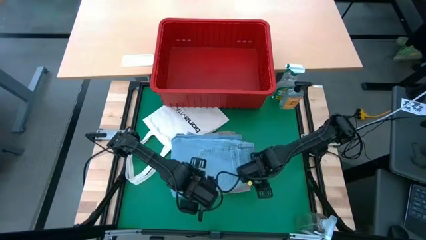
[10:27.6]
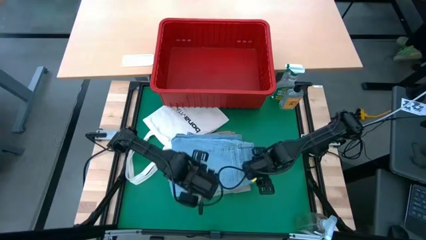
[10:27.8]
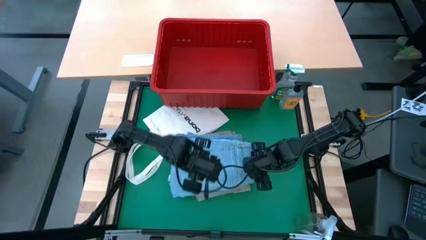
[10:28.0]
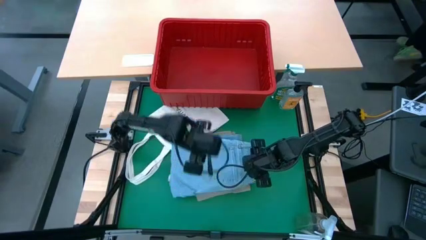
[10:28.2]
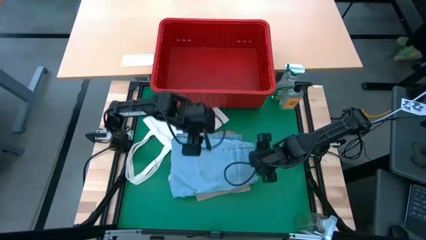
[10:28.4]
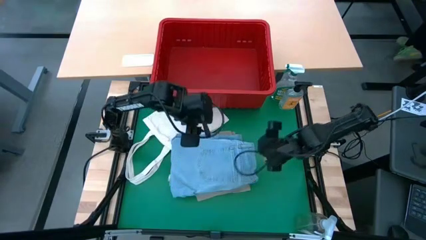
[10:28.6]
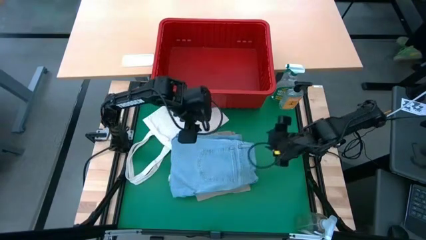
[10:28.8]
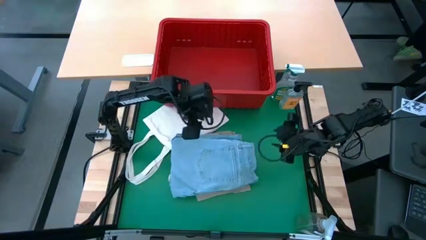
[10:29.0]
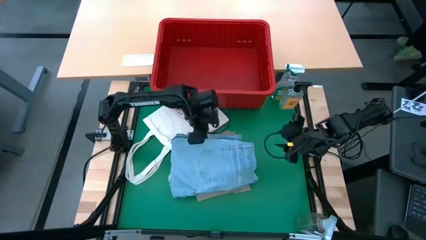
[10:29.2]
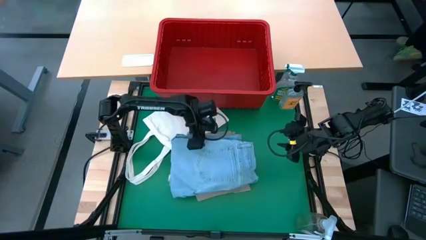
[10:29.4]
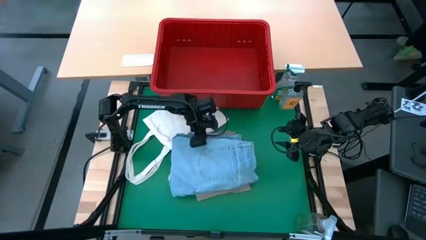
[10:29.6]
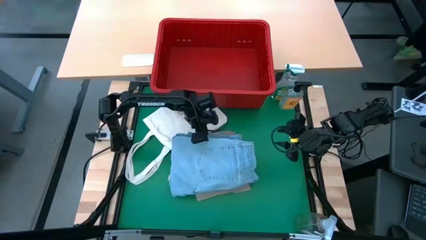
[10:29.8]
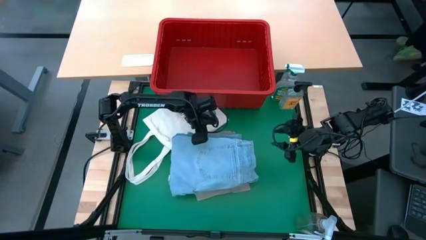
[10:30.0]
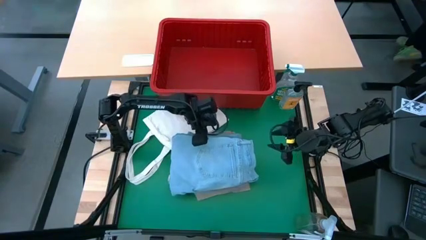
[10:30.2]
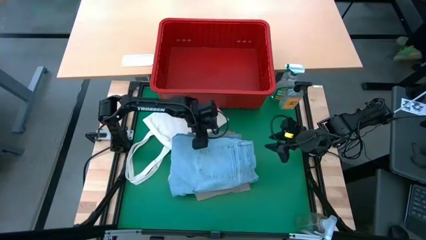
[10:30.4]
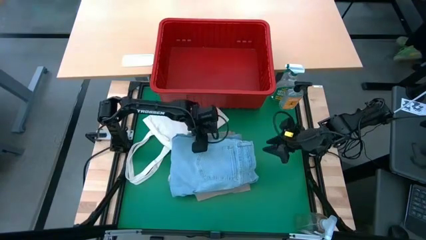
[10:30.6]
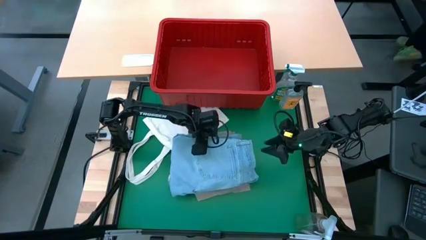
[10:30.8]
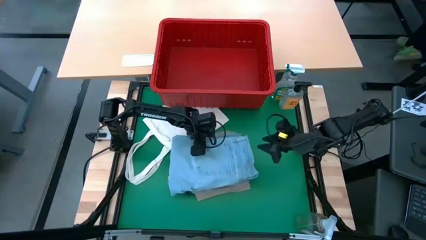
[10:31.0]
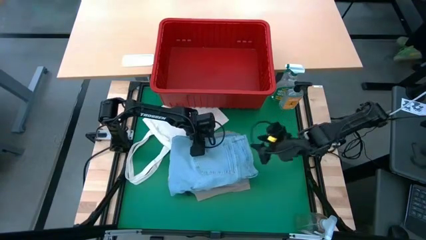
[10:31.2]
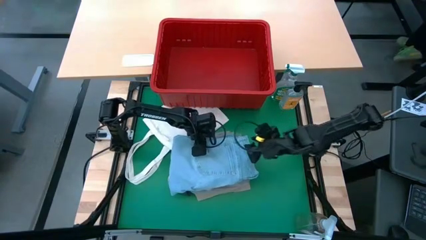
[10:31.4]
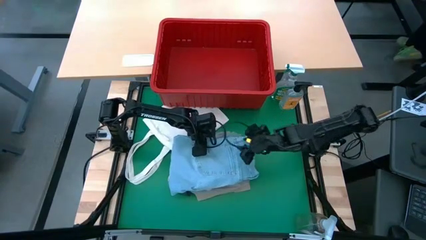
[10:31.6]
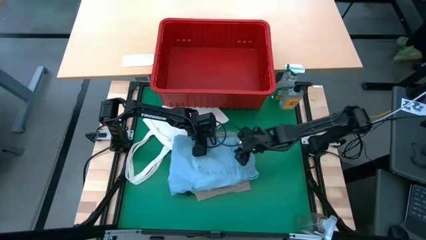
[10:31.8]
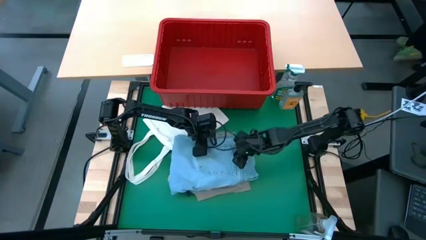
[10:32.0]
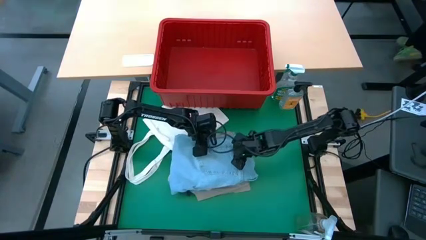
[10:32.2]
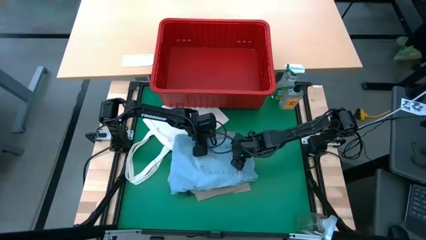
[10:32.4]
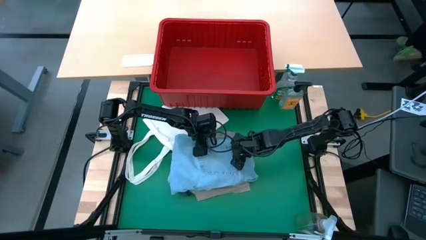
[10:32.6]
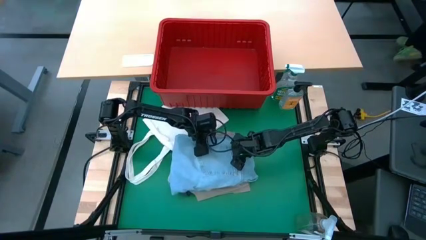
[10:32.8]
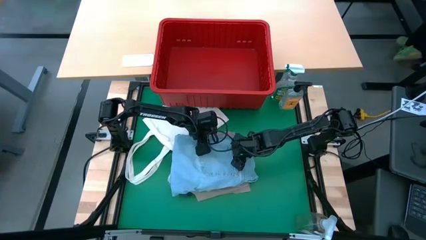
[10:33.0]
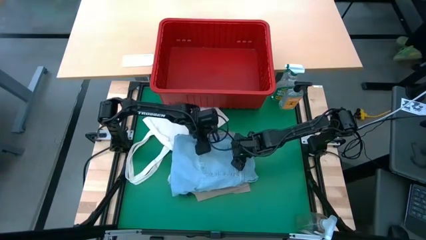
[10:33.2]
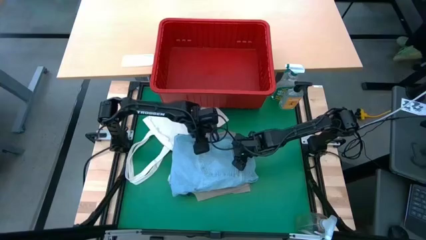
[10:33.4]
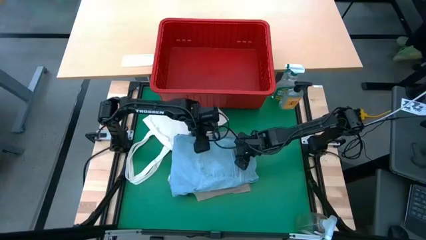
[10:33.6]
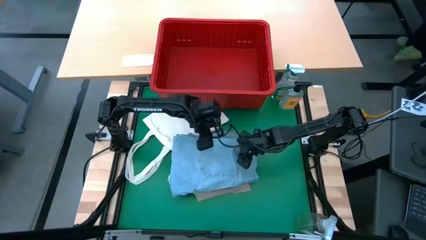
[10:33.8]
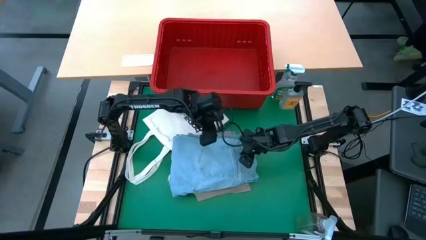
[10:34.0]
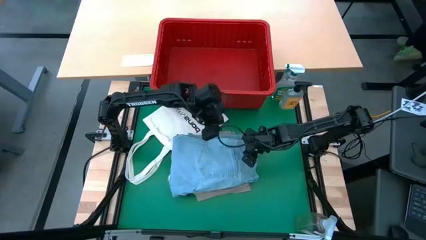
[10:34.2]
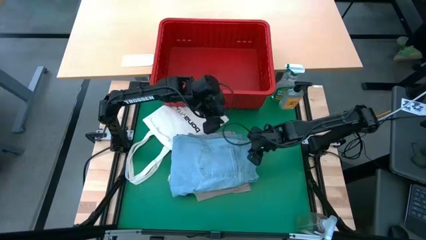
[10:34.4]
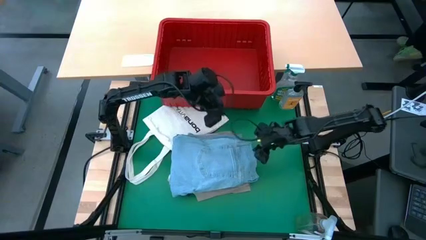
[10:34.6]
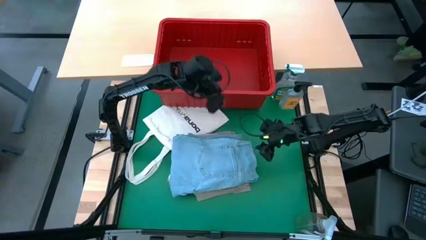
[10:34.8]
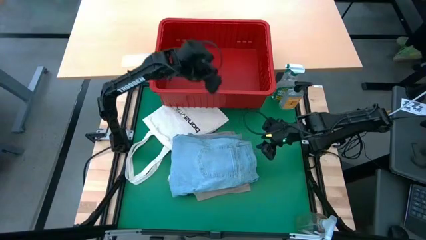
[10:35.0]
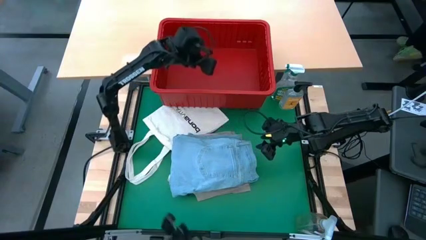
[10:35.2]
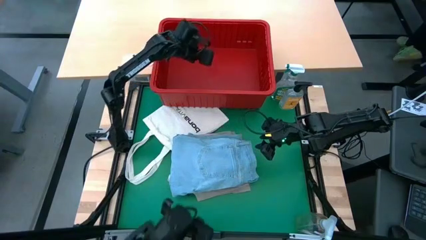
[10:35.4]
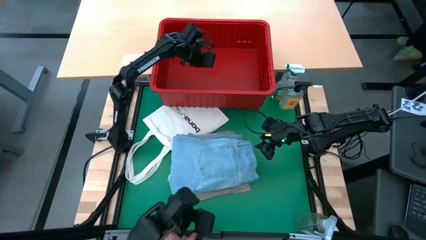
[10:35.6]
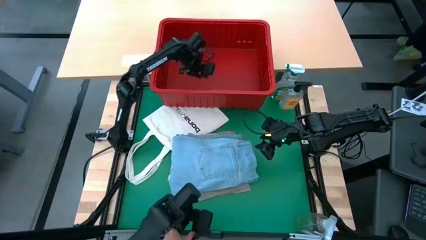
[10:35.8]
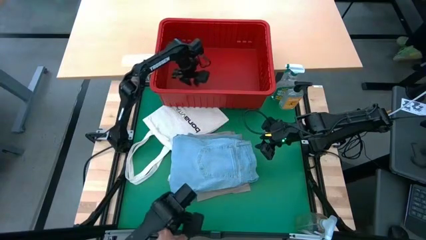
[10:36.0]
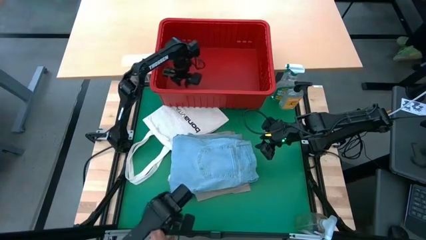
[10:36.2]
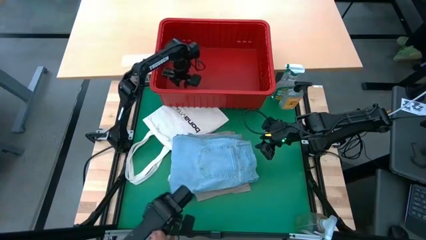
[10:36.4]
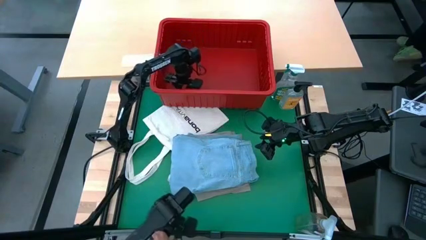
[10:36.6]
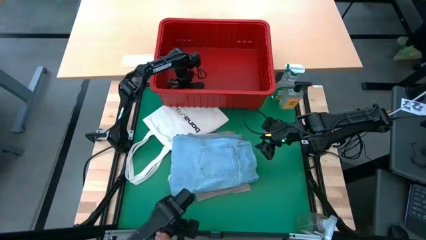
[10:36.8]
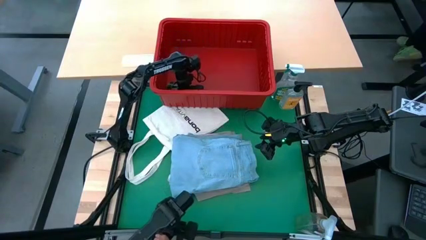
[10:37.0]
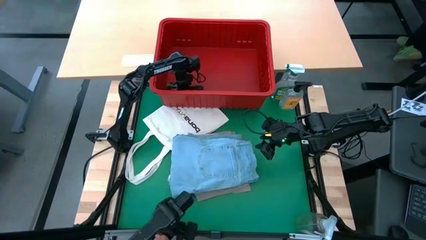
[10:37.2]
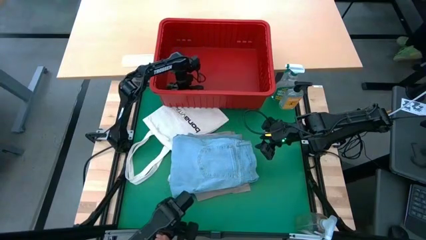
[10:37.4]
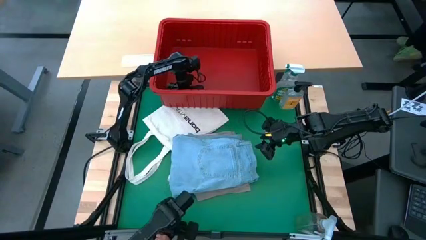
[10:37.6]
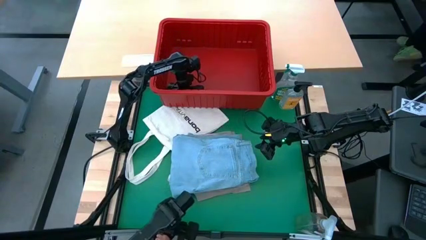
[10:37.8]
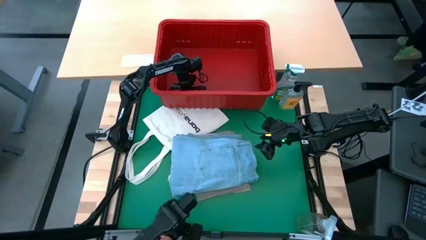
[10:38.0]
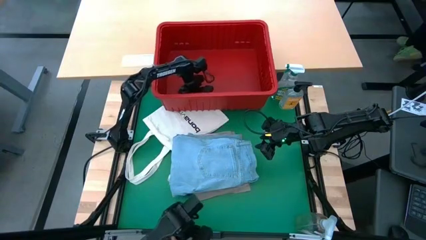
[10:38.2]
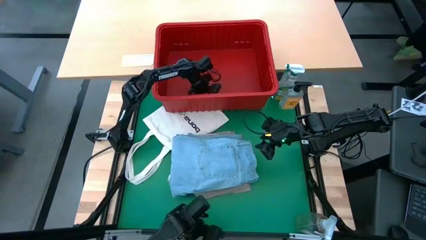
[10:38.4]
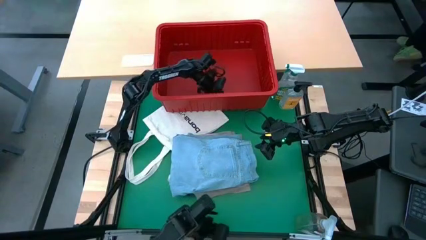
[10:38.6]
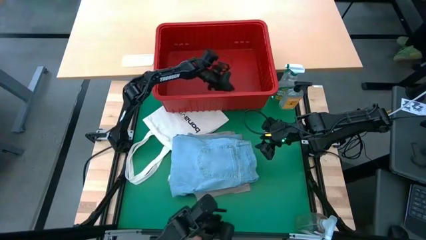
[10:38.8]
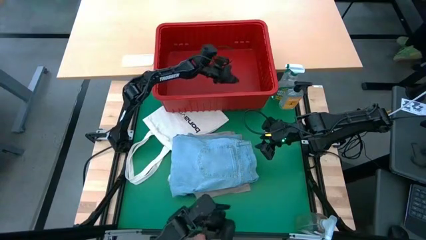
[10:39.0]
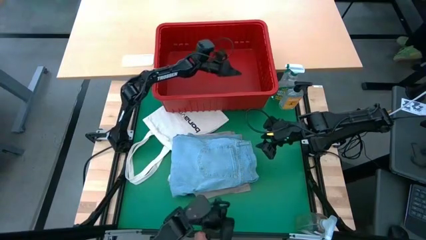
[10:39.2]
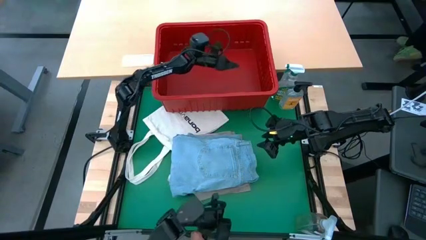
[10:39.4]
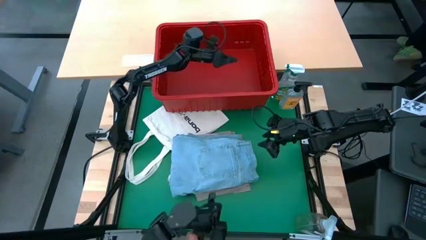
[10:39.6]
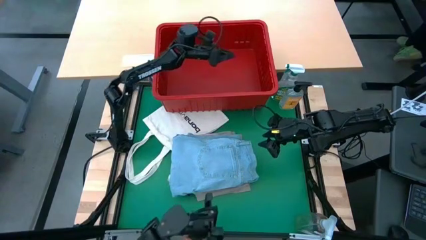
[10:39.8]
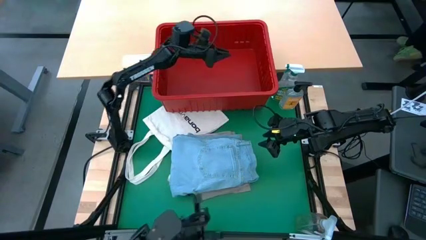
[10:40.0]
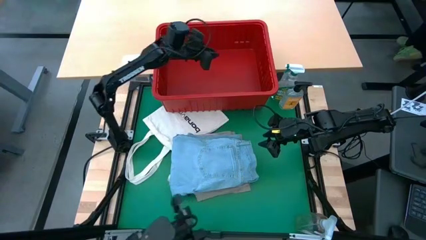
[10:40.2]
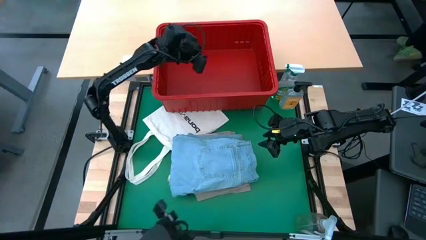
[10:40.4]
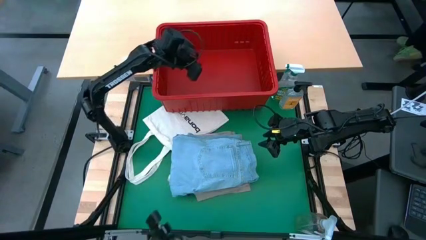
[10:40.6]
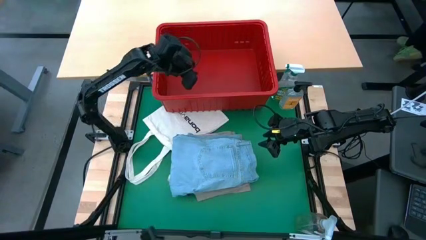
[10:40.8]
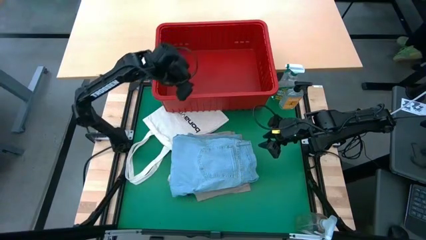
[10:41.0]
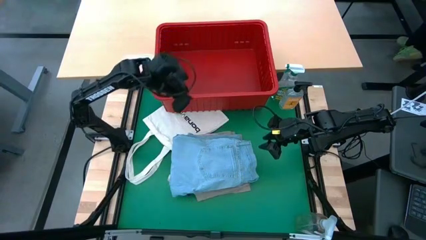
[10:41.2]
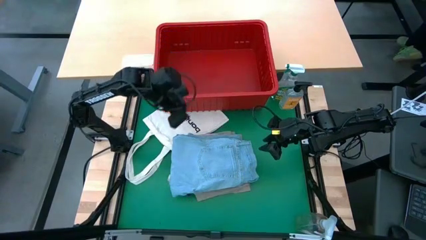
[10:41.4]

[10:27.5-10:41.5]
Task: Fold laundry
Put the stacked clothing into the red laundry bin
